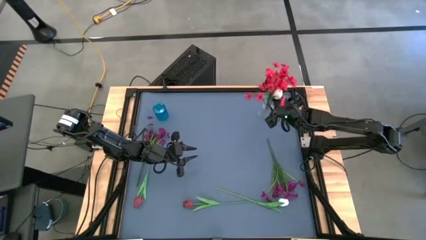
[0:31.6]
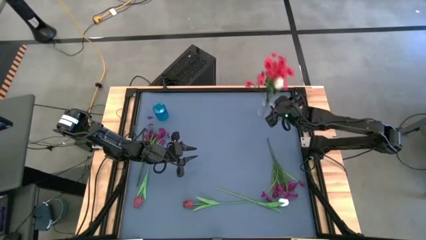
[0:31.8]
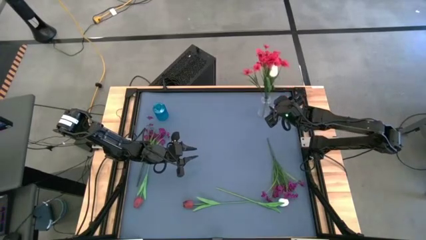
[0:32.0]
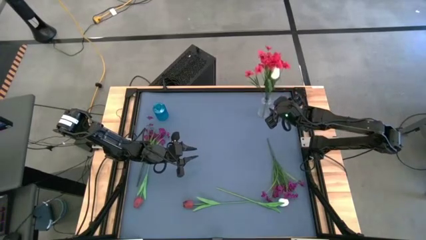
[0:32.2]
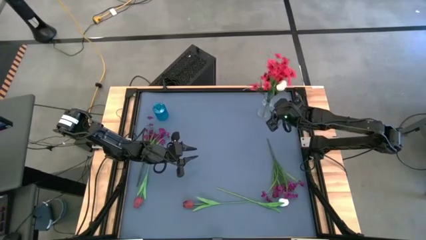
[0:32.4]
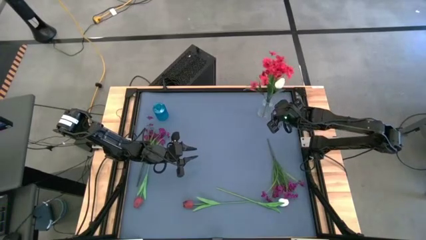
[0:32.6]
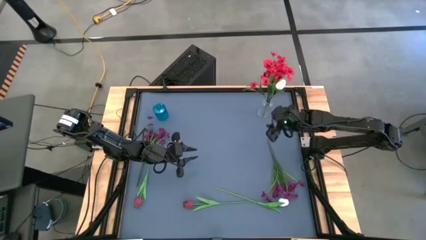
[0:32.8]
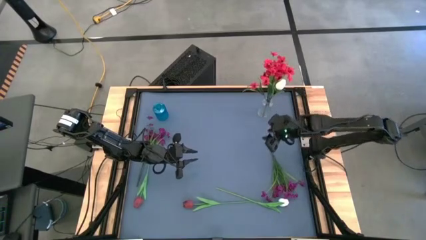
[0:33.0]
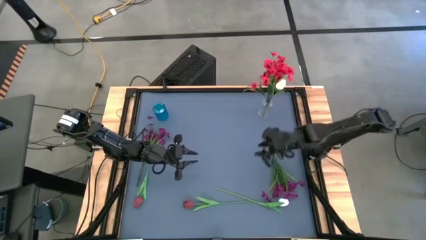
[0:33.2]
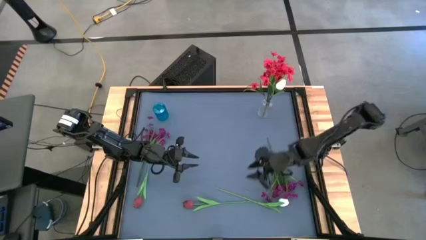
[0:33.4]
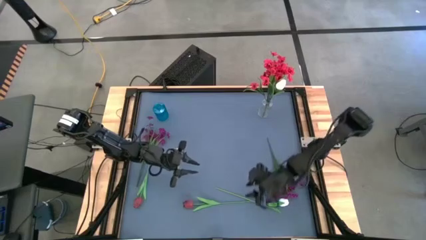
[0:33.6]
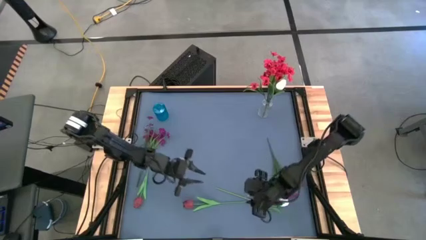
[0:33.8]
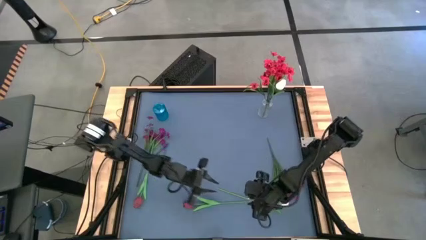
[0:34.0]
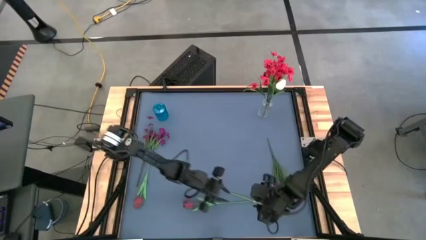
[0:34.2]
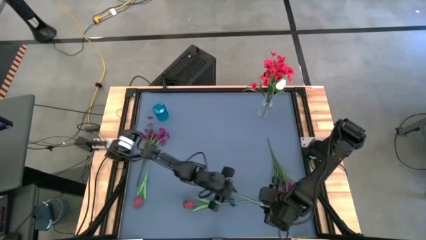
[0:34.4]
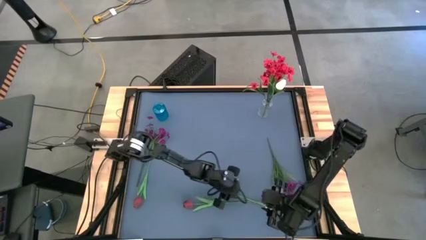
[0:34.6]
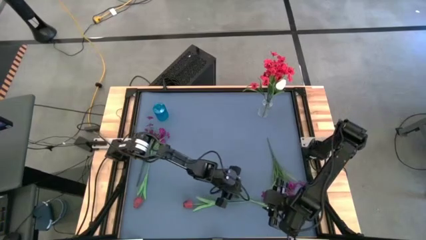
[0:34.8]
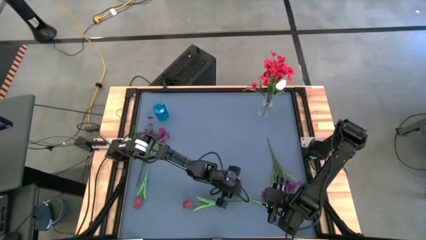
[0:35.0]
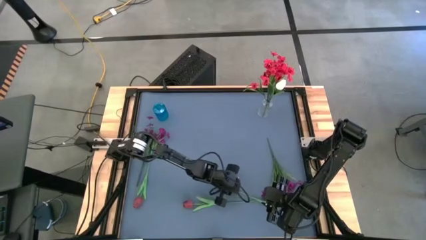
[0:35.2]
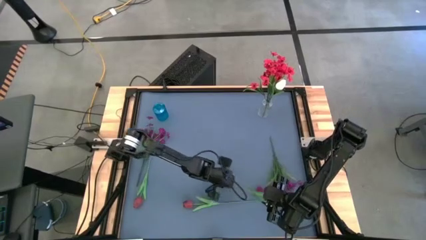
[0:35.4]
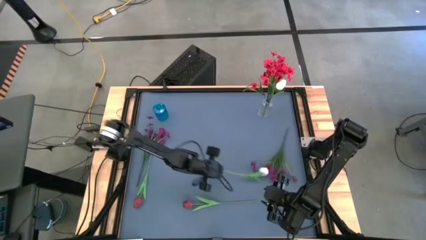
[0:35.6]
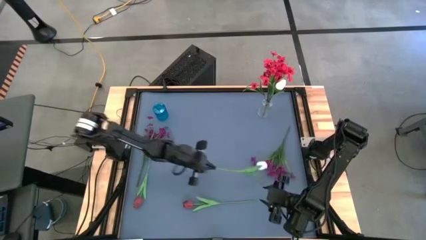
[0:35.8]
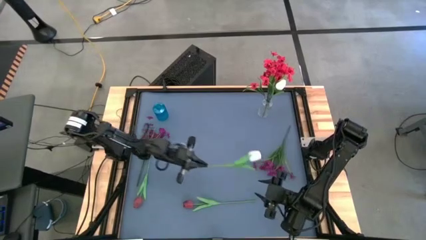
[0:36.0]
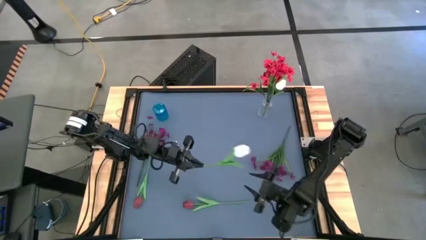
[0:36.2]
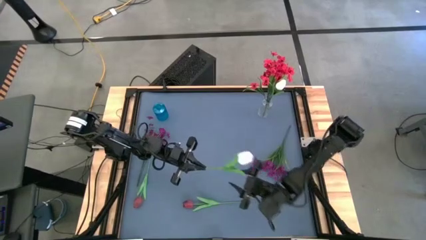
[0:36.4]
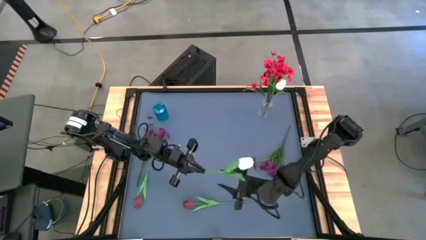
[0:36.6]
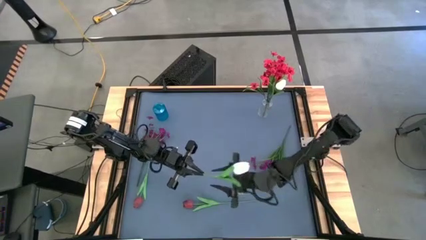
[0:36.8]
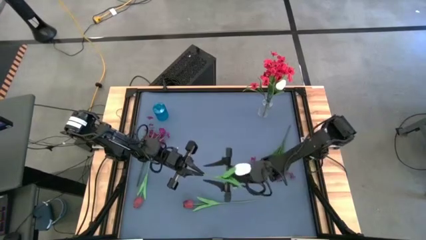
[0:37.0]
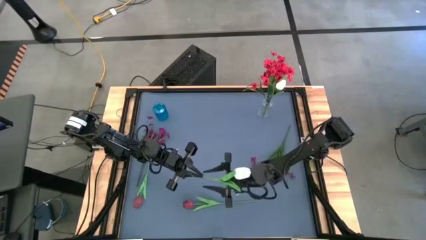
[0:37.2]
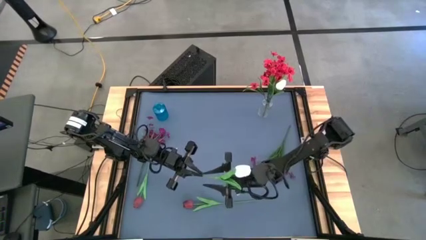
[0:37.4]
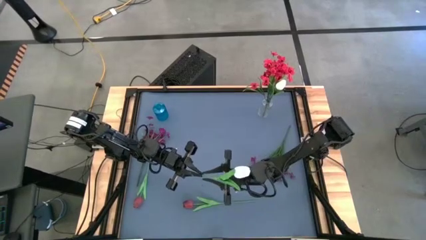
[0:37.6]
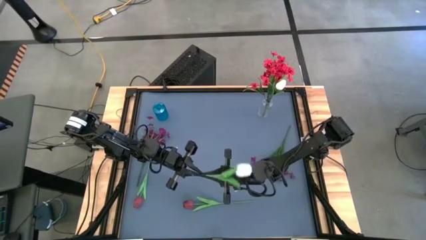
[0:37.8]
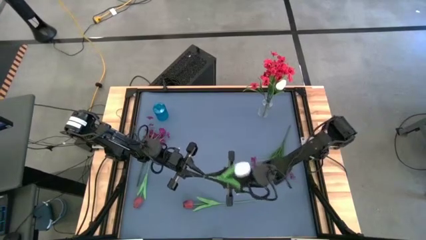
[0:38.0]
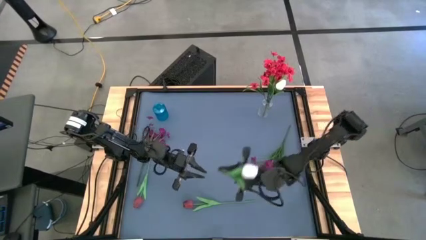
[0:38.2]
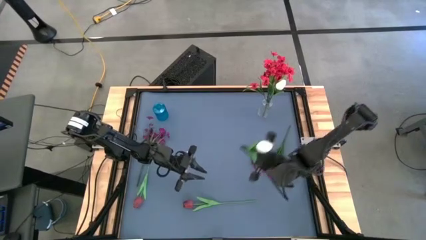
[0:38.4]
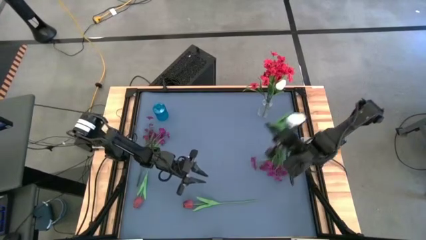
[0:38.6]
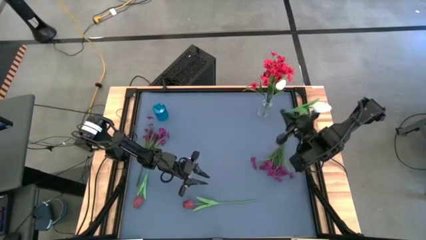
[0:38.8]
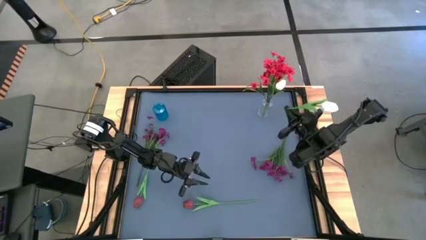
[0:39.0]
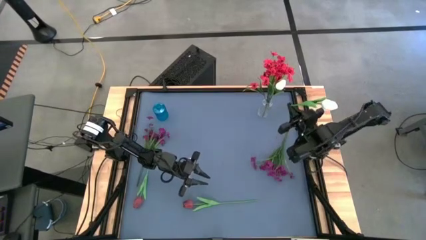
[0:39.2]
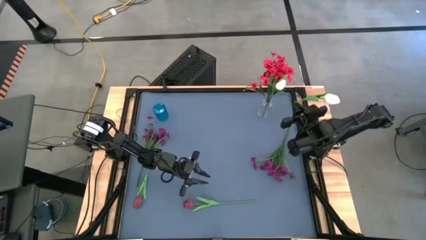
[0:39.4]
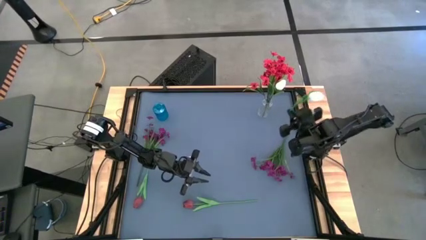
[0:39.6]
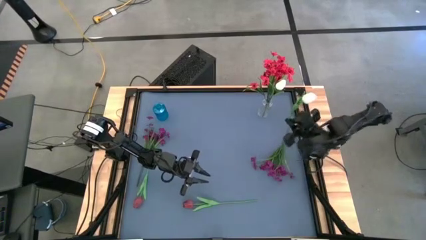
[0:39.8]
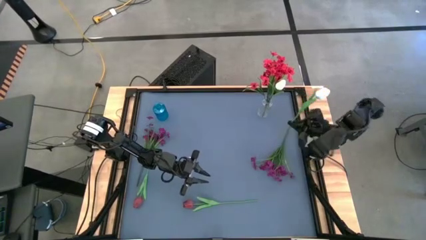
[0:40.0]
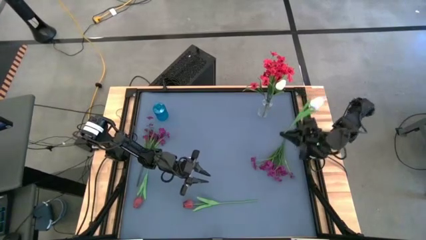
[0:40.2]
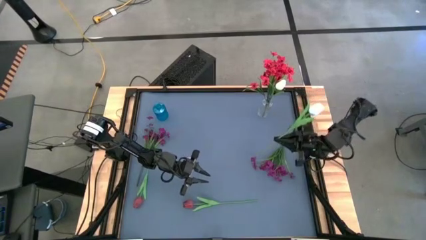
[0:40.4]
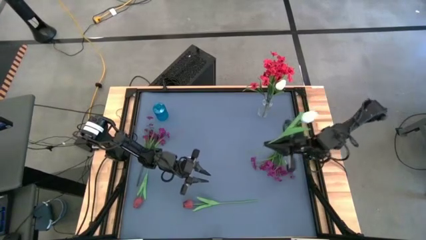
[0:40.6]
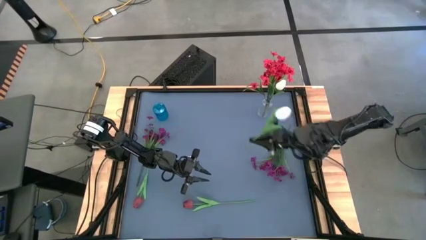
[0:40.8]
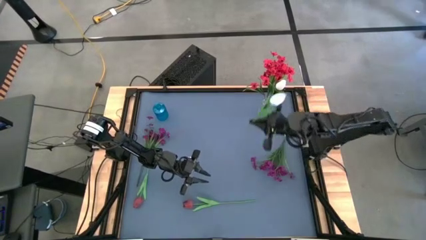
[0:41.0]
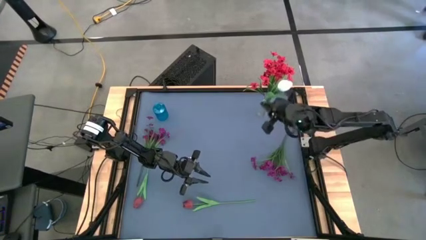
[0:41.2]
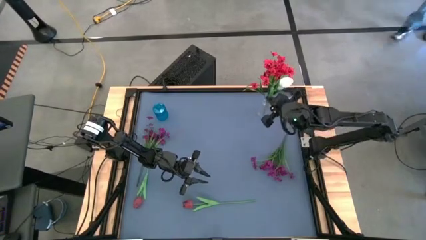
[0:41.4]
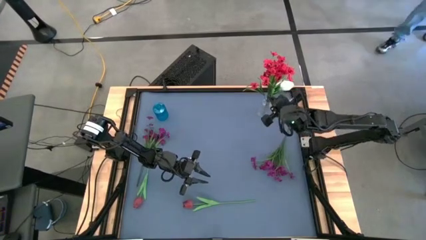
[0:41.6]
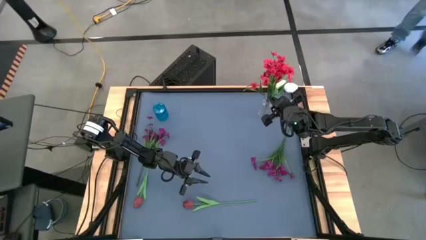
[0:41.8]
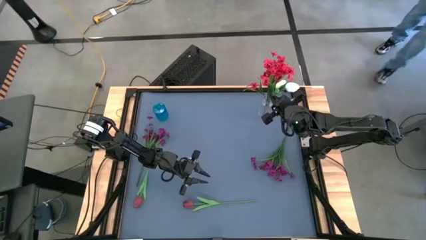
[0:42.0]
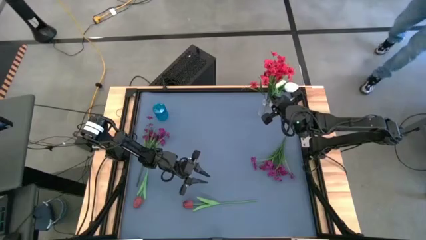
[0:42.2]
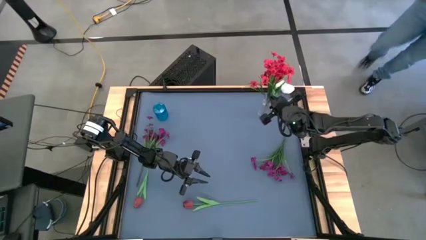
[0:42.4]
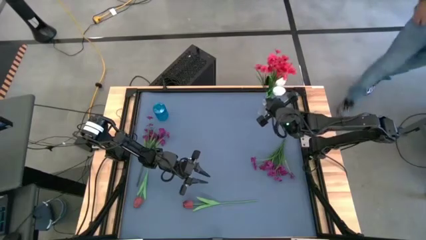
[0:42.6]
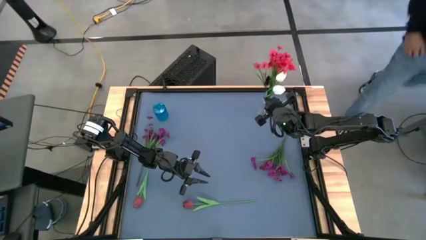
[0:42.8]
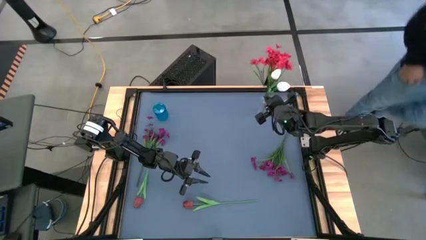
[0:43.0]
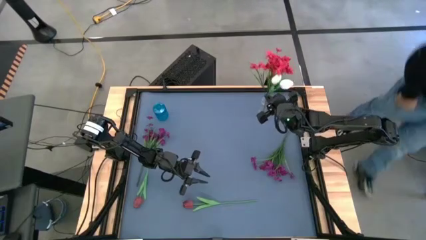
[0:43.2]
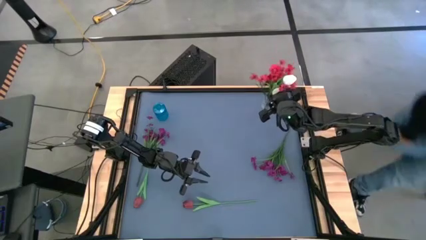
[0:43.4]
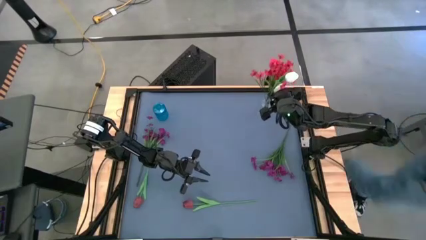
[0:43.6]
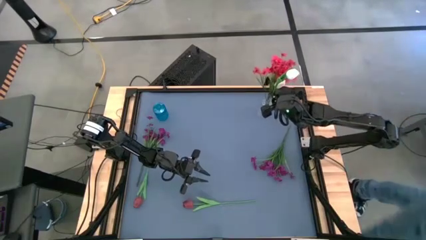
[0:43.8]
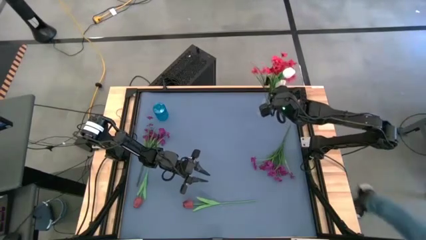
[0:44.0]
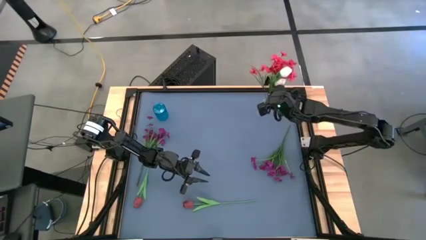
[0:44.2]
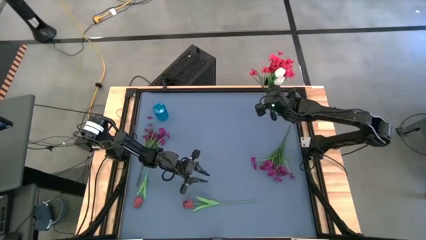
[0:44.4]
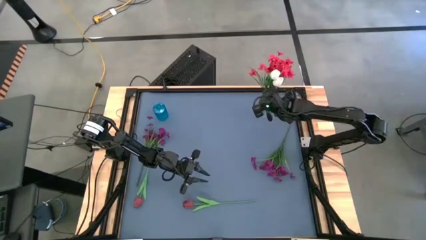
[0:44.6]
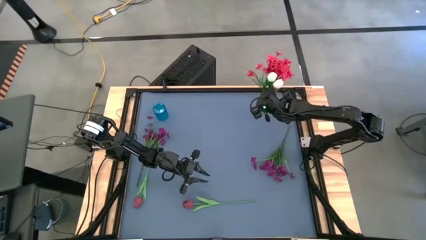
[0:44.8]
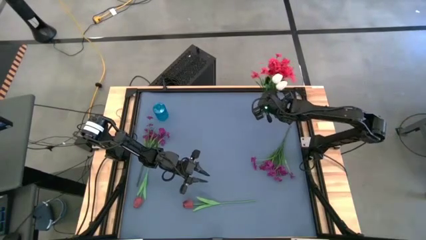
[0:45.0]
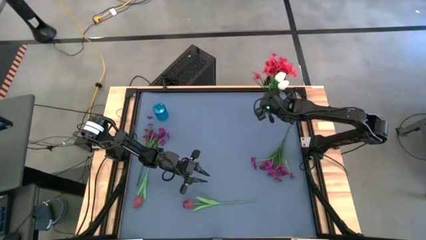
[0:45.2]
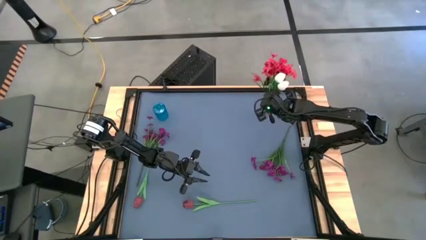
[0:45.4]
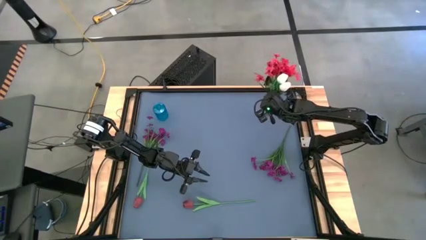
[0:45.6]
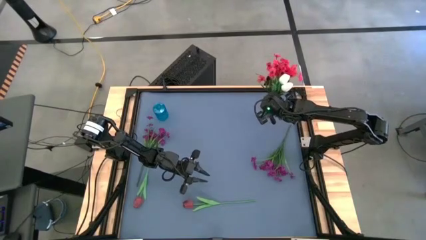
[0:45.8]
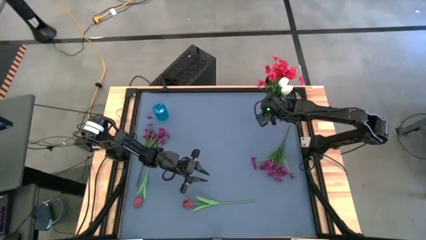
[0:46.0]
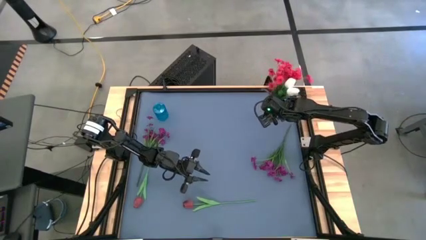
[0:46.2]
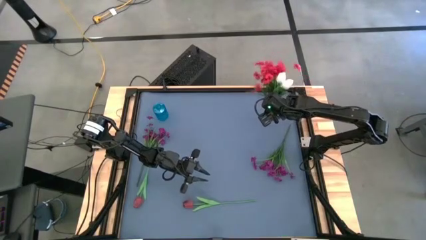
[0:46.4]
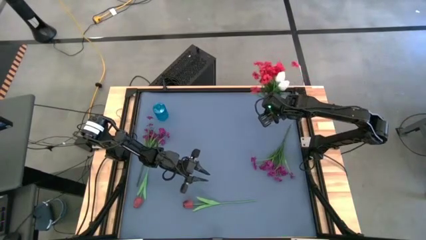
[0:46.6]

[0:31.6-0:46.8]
Task: Sort flowers into vase by color
Put the white tulip into the transparent vase

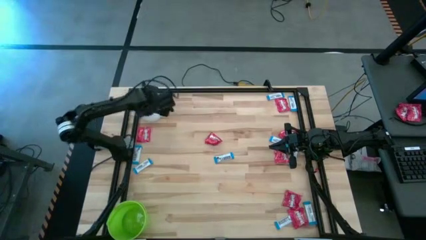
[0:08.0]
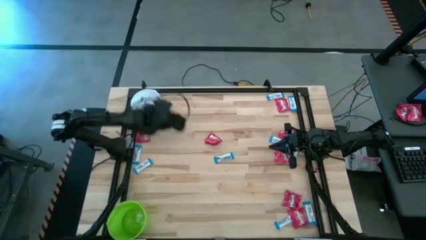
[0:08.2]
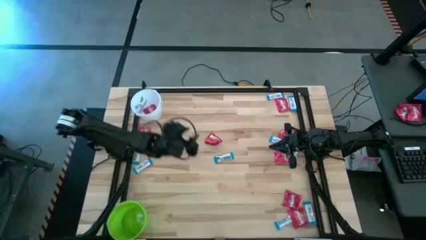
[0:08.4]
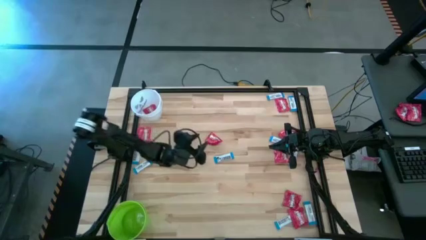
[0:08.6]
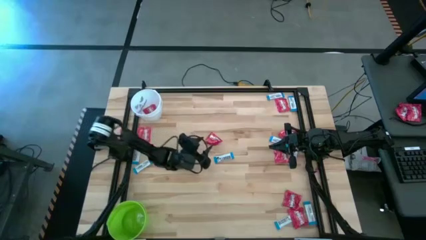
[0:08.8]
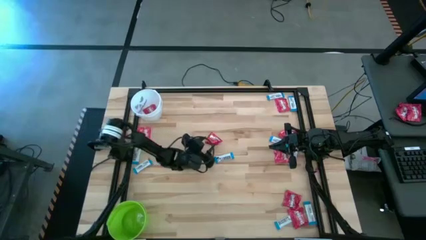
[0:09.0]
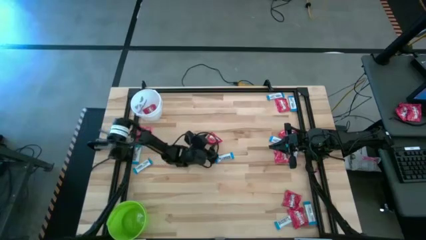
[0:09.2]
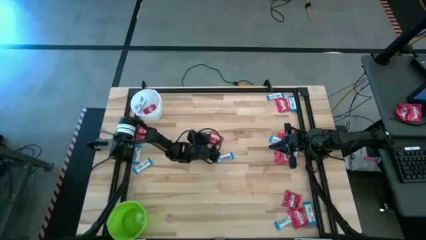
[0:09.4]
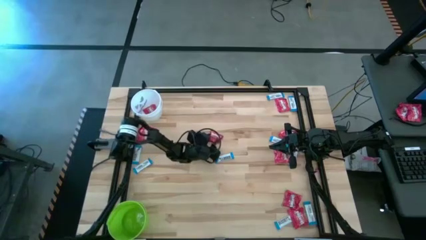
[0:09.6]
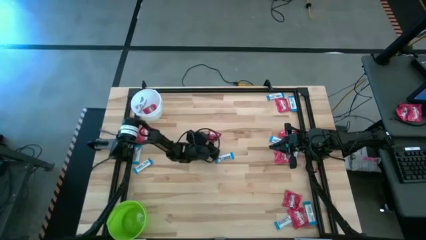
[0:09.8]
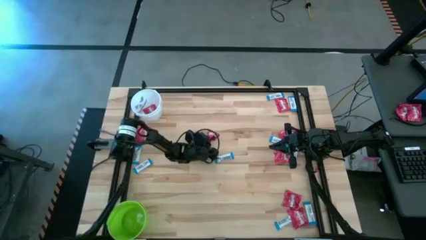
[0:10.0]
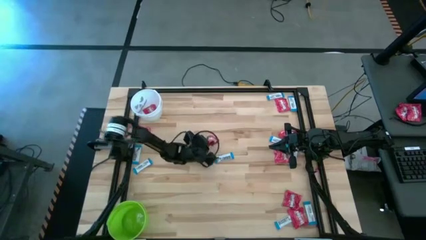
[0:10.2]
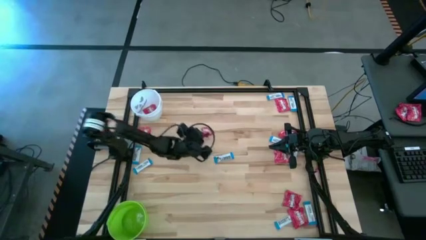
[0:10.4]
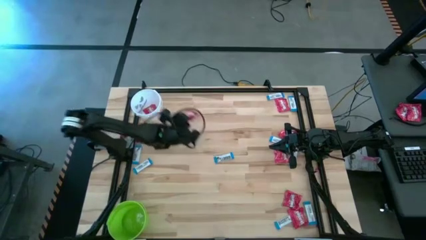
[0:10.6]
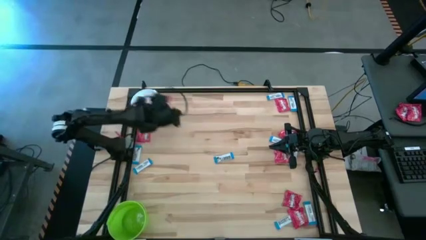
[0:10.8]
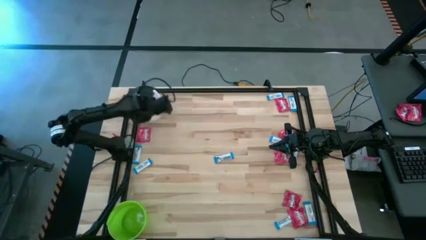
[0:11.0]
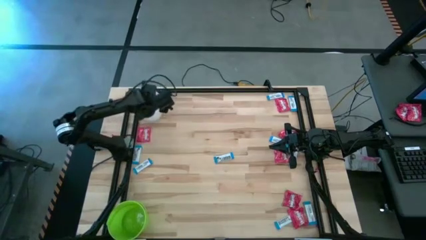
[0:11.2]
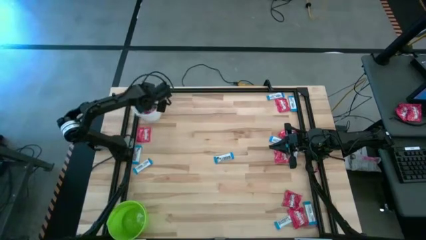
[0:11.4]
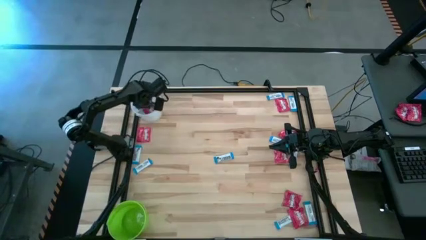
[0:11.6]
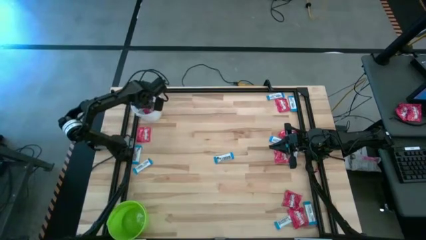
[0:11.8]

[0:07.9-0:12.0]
Task: Sort candy by brand, put in halloween buckets
Put the red candy into the white bucket
